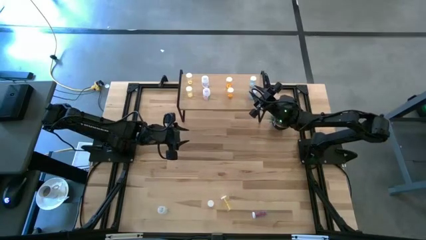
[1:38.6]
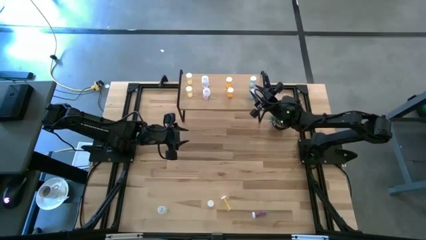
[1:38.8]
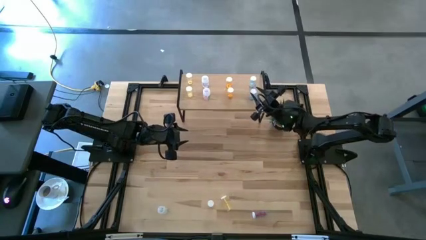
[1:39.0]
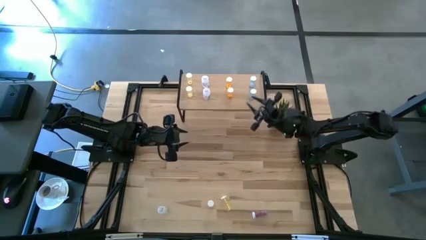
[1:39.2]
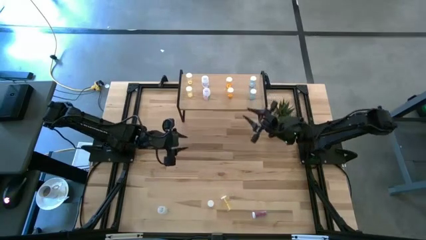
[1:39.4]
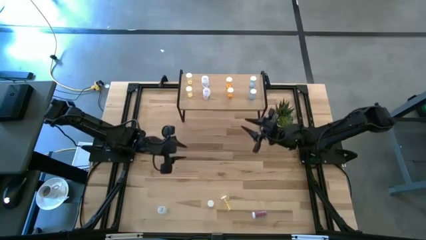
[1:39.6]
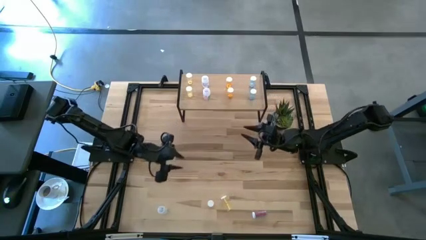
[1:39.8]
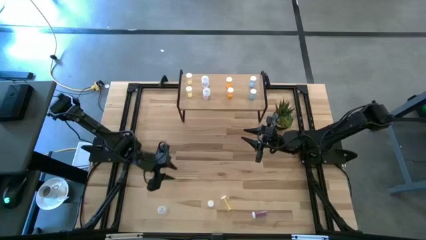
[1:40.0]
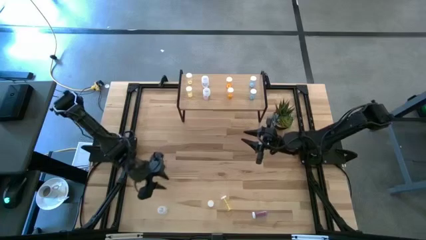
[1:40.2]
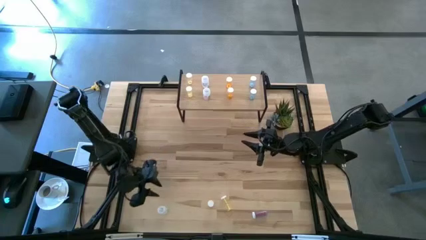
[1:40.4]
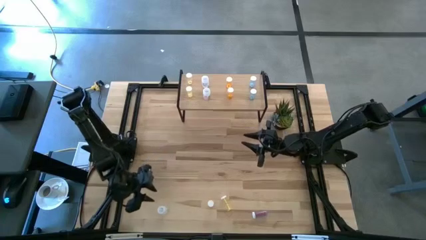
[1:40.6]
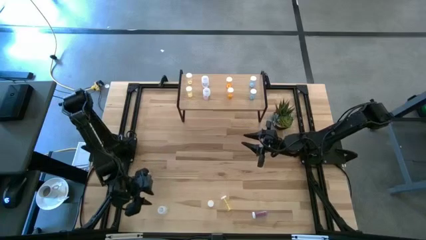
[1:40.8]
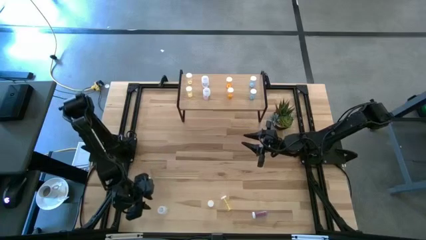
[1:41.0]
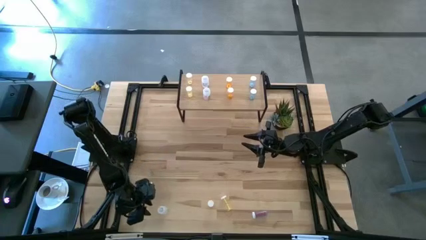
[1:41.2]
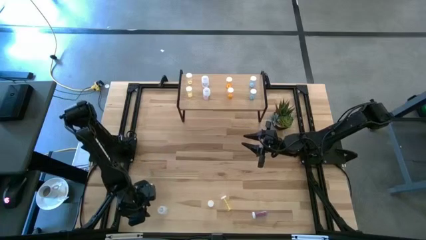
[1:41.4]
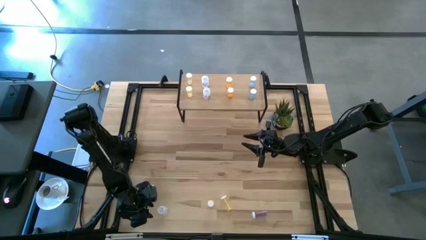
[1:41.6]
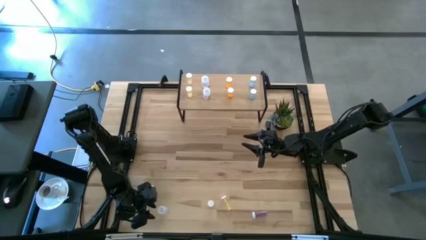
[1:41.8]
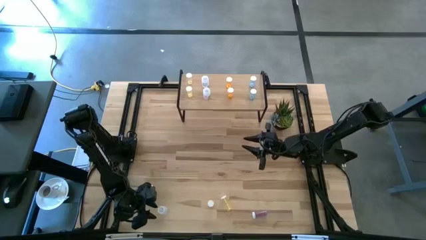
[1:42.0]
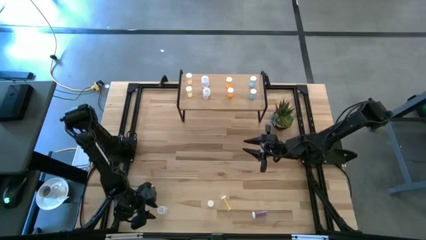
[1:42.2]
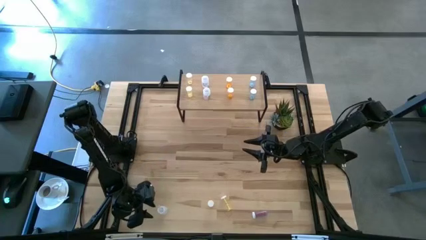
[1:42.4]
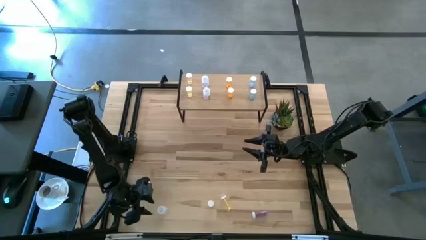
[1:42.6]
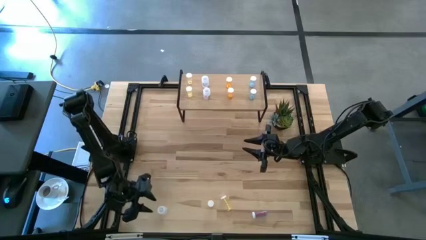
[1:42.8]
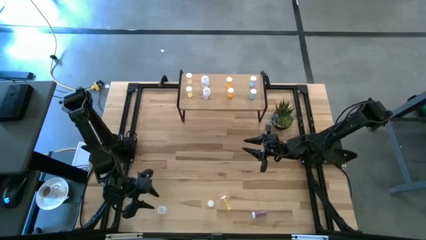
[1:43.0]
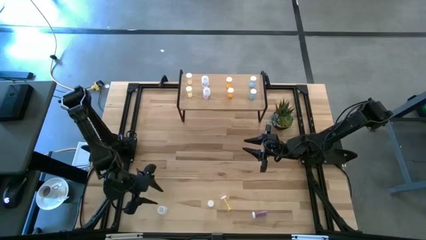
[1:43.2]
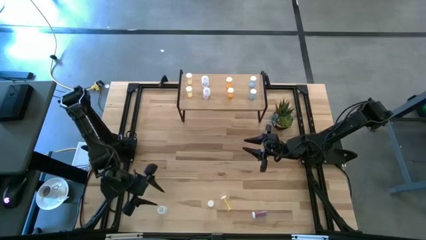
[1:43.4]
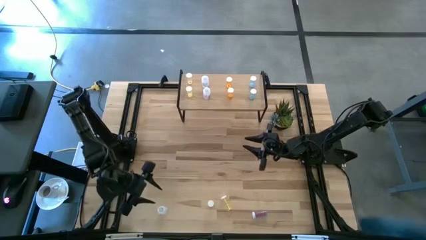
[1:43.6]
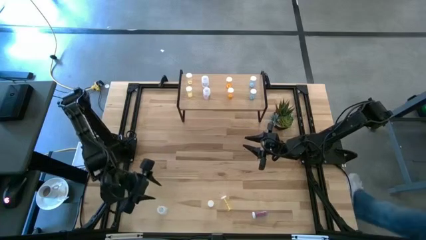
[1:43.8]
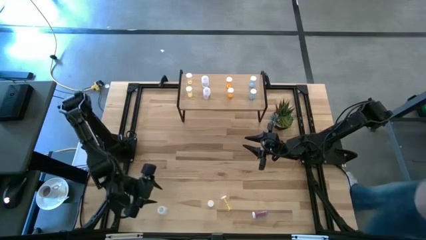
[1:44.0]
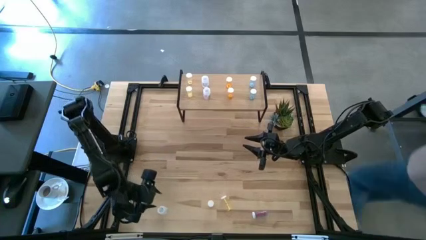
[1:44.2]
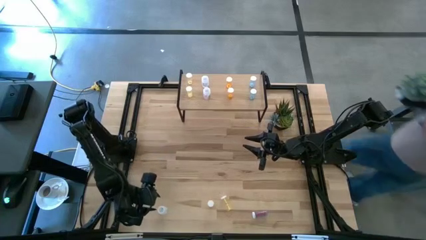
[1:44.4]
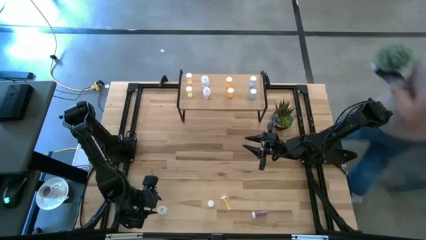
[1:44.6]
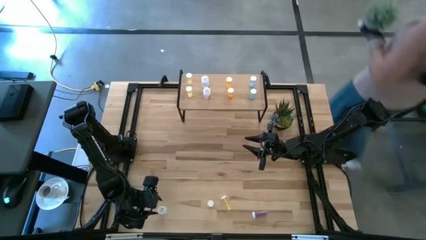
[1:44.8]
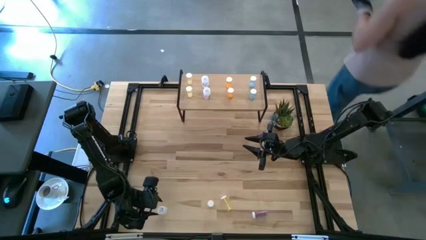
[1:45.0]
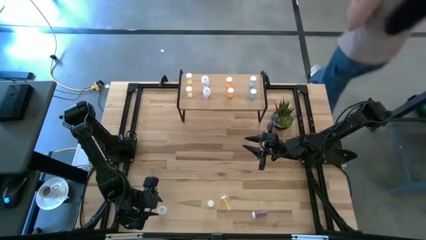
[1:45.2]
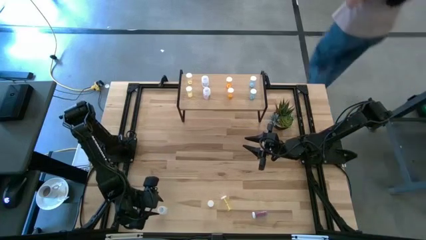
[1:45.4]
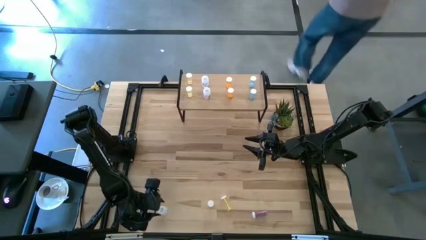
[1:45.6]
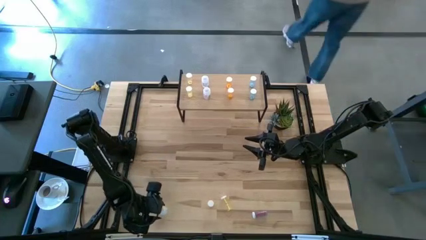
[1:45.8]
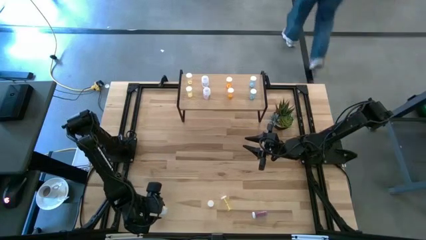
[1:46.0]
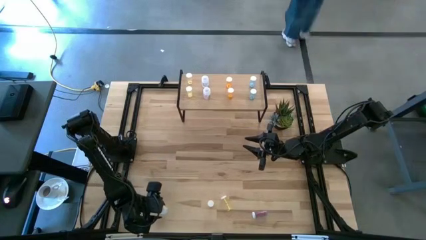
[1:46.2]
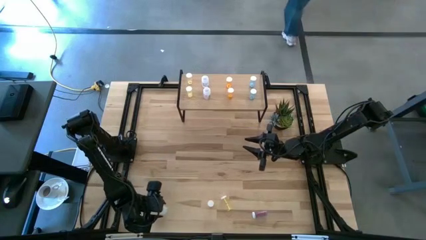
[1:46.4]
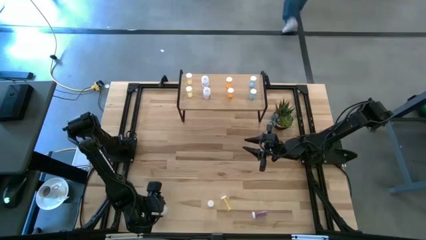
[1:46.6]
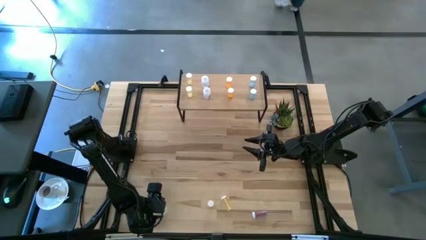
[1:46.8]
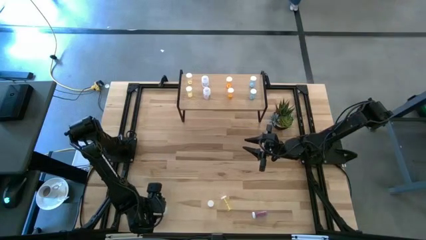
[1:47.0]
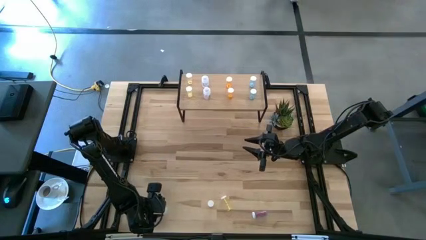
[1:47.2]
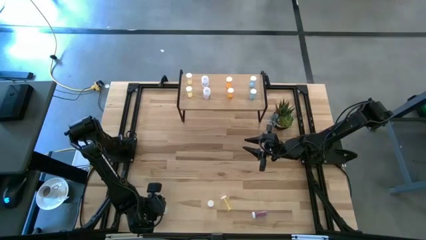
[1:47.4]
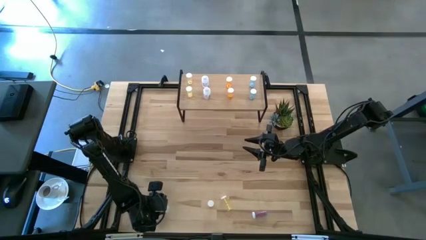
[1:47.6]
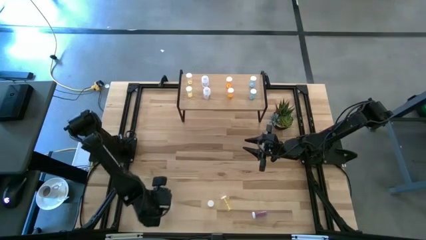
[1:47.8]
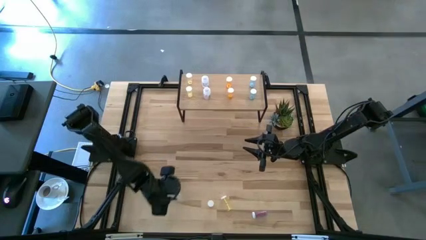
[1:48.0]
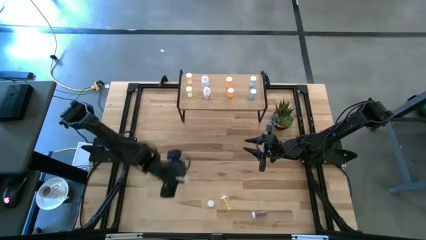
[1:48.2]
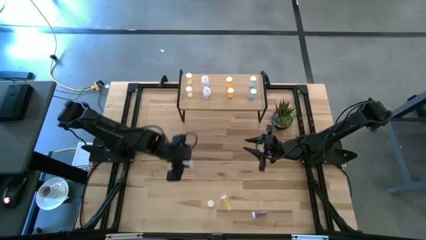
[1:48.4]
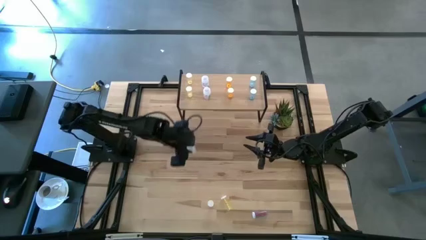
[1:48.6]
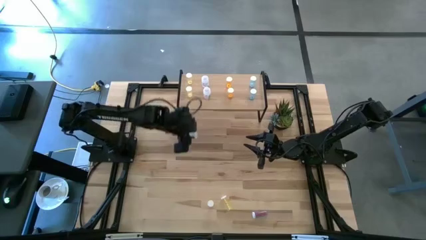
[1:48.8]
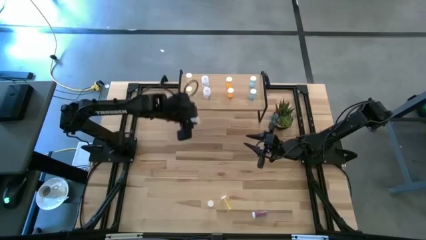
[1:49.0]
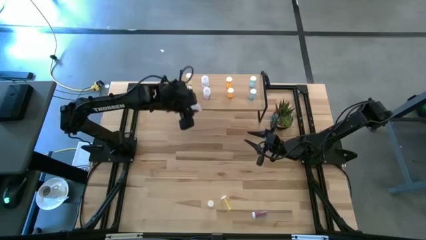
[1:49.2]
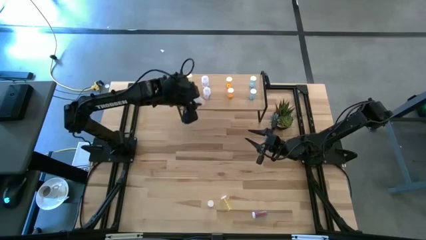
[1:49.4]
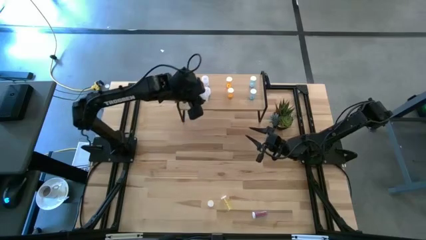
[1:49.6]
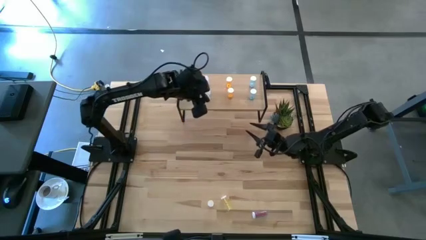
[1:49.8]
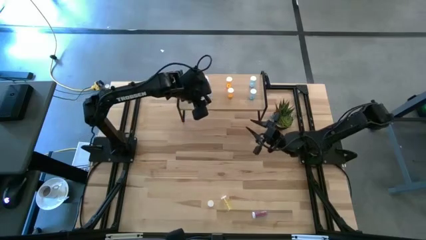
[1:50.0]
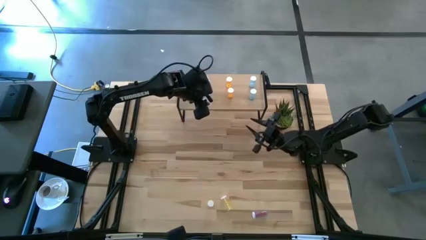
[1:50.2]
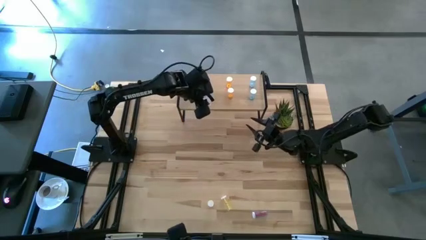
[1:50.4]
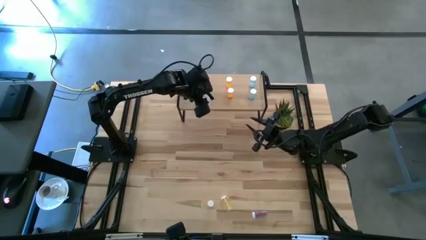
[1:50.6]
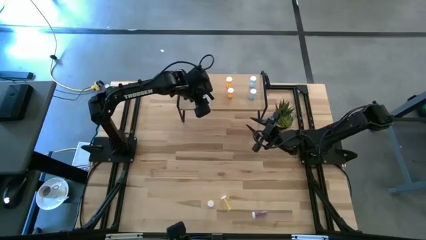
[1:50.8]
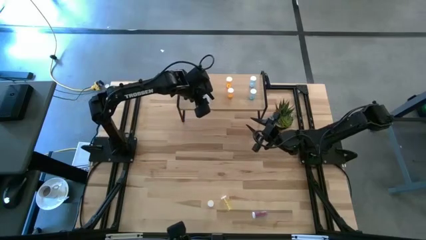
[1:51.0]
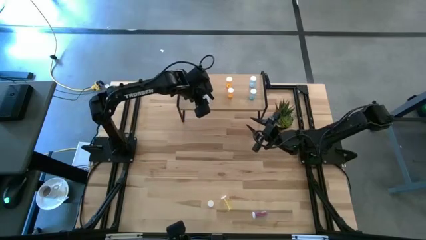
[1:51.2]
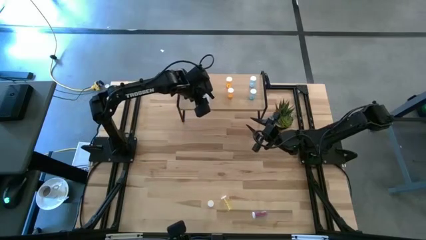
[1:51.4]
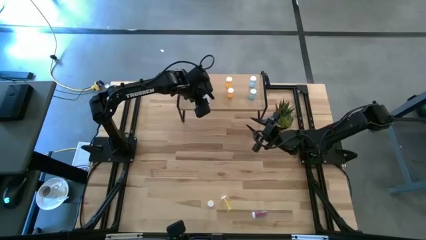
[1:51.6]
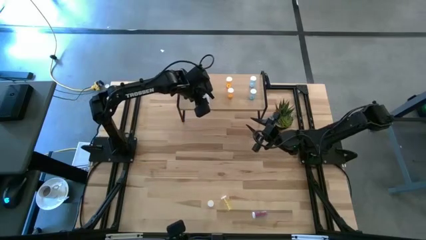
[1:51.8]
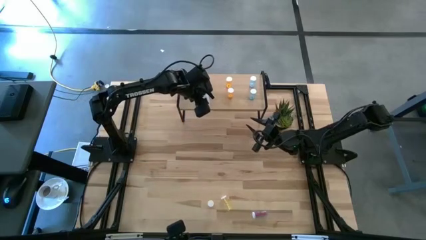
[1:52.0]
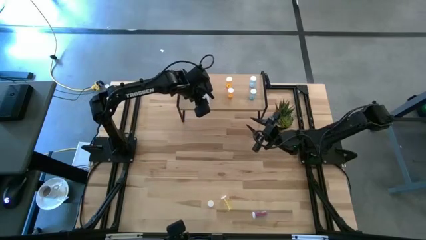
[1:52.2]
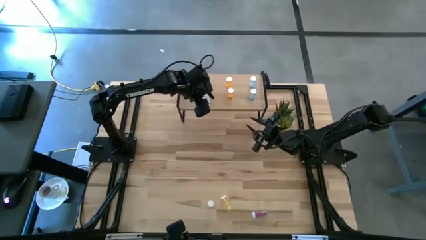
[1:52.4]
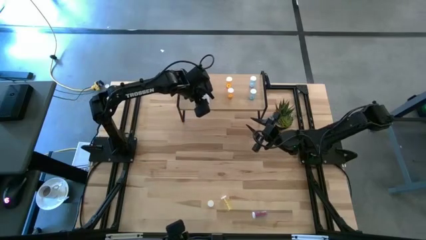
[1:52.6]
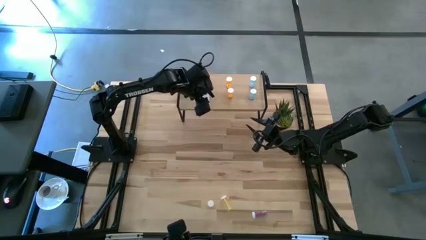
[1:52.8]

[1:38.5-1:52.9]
Task: Pick and place medicine bottles onto shelf by color
Put the transparent pill bottle on the shelf aligned with the other transparent pill bottles

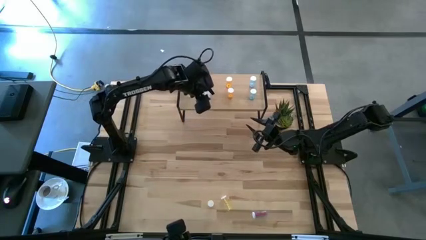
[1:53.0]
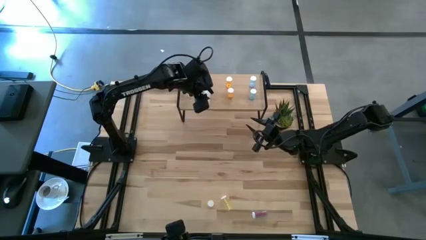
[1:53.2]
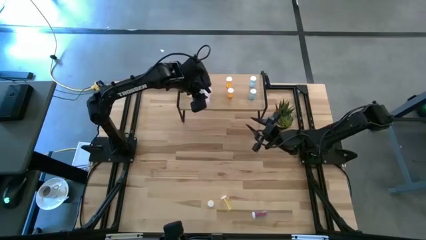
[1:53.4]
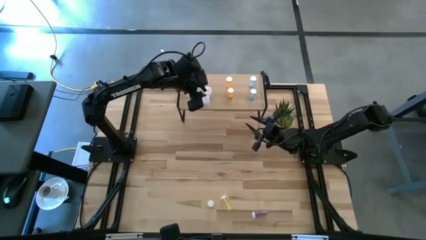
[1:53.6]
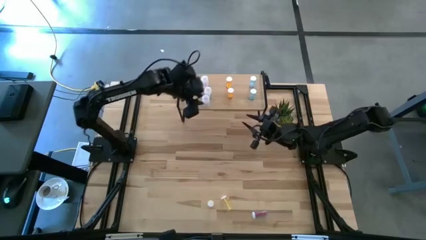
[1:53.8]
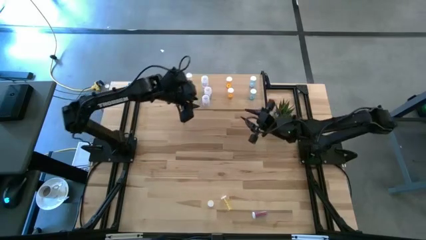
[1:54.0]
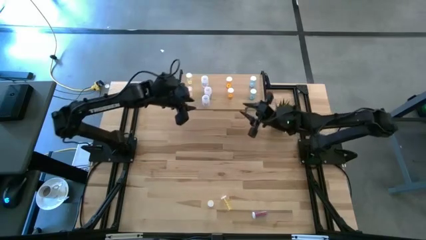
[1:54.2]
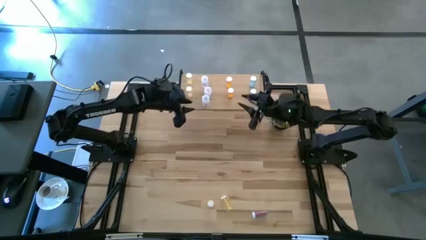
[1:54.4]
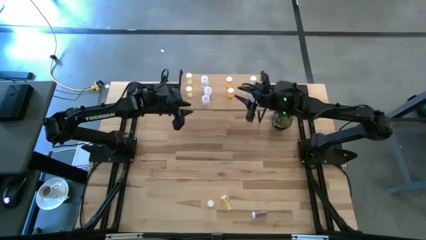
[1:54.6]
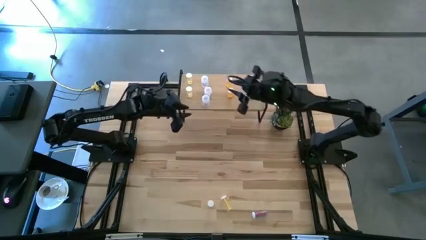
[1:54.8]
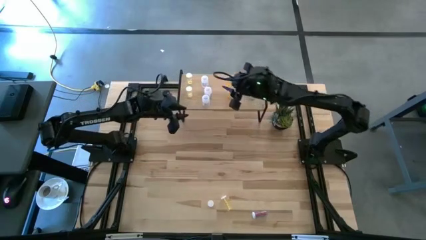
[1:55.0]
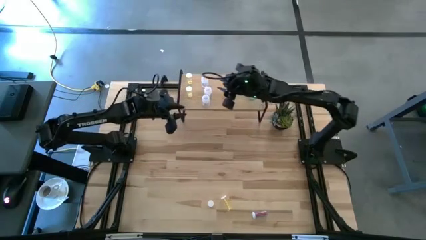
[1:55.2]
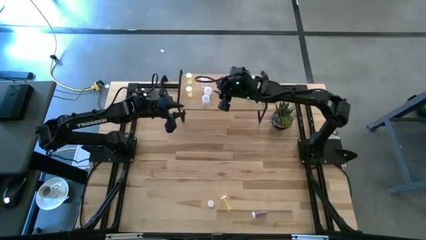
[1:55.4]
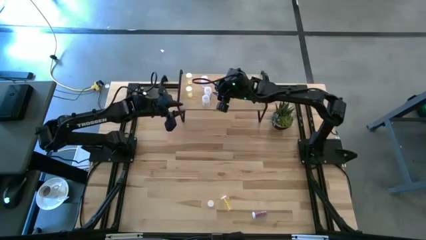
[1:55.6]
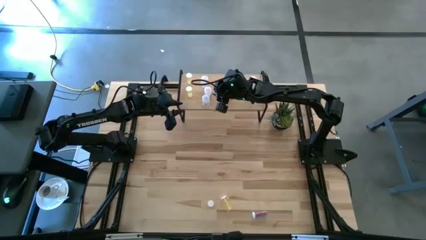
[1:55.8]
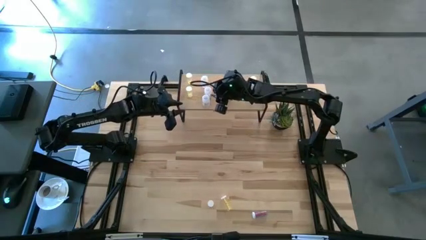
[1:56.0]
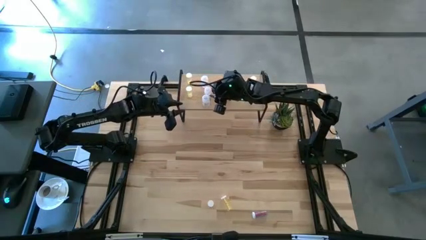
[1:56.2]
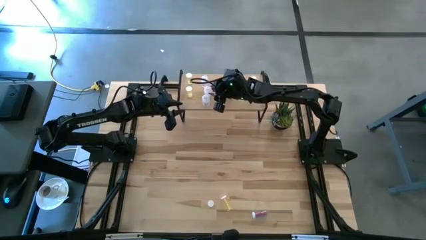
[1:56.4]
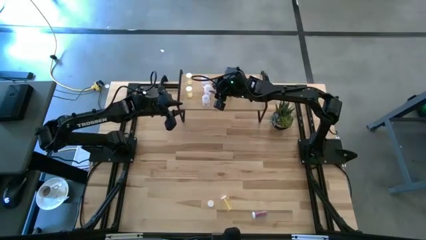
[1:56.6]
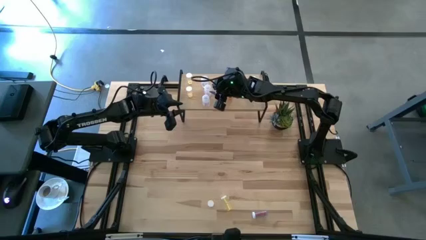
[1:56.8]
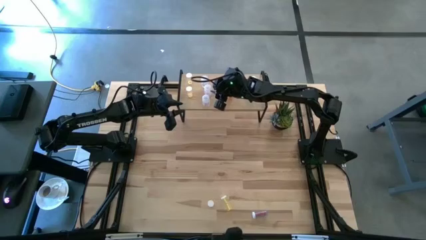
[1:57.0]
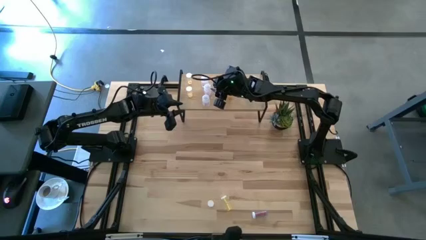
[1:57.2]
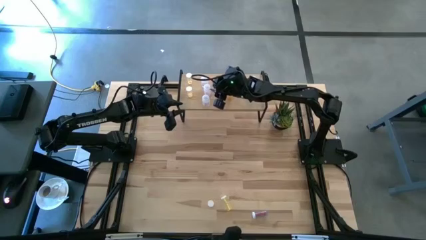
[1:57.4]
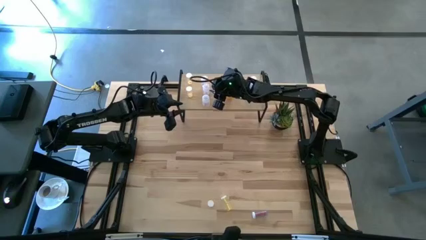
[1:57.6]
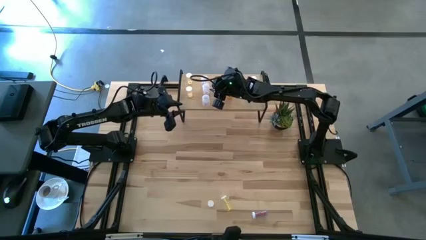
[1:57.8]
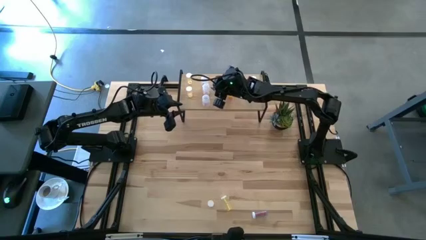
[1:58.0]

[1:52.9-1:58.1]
Adjust the middle transparent pill bottle on the shelf
